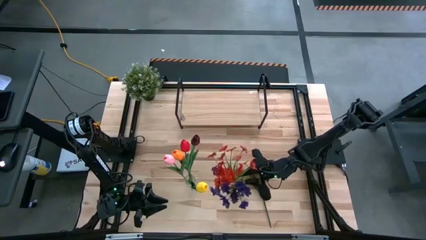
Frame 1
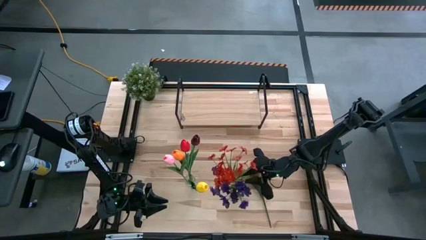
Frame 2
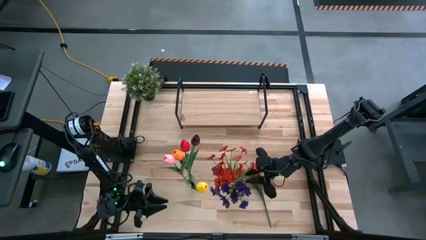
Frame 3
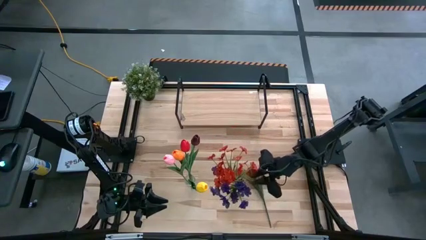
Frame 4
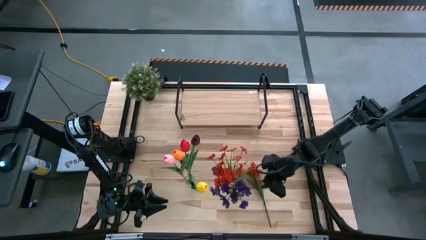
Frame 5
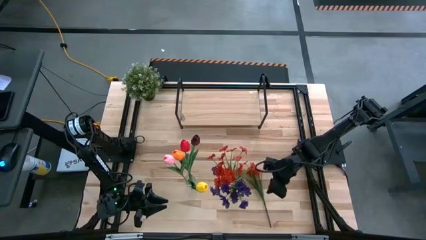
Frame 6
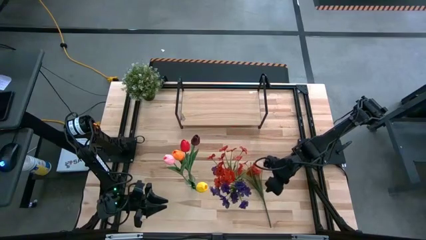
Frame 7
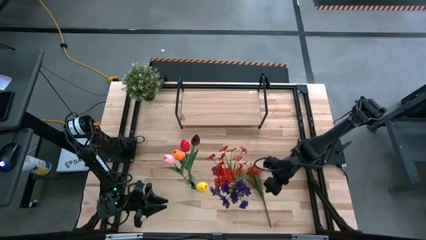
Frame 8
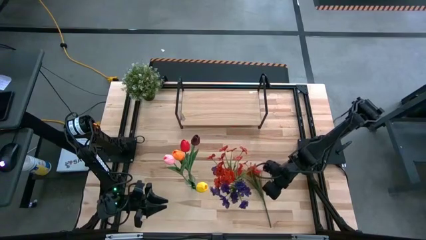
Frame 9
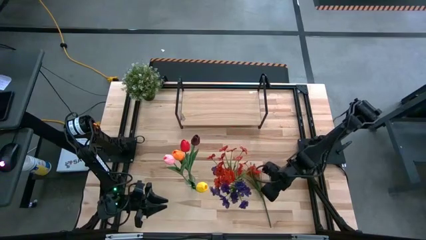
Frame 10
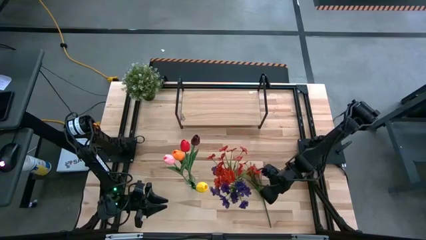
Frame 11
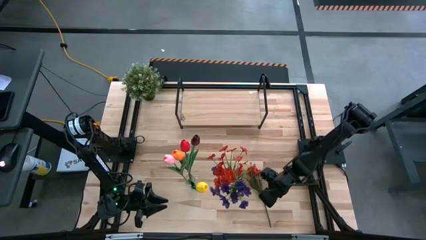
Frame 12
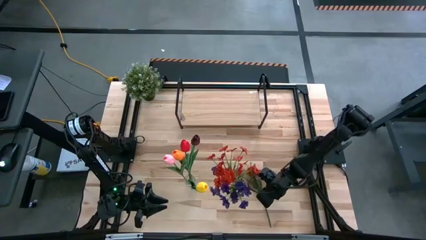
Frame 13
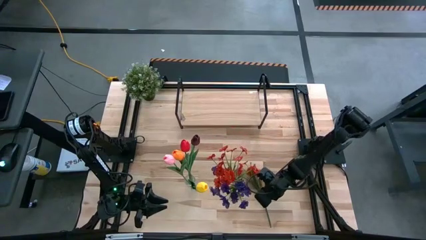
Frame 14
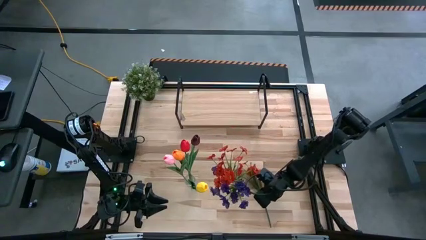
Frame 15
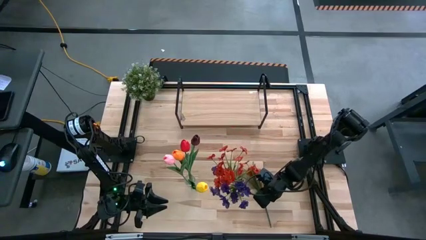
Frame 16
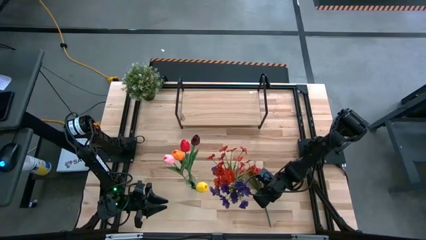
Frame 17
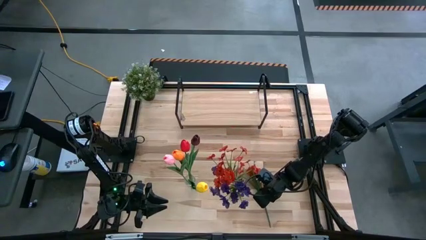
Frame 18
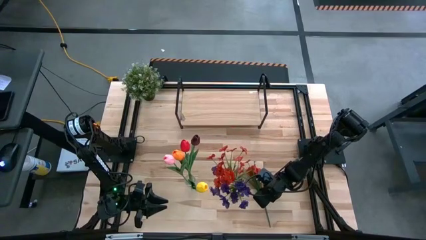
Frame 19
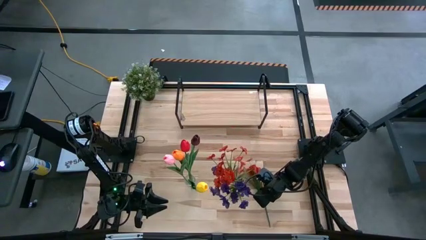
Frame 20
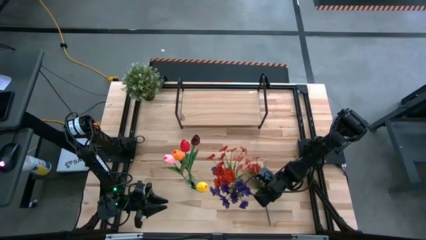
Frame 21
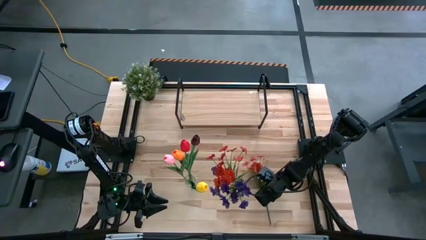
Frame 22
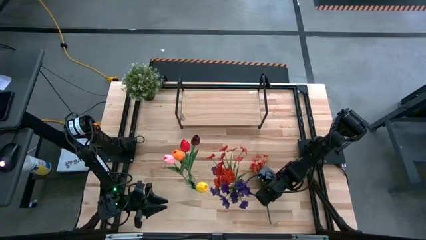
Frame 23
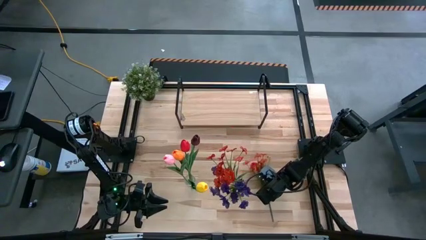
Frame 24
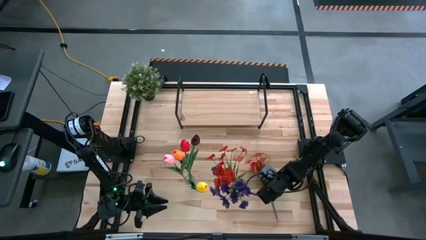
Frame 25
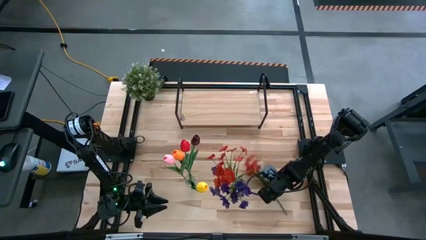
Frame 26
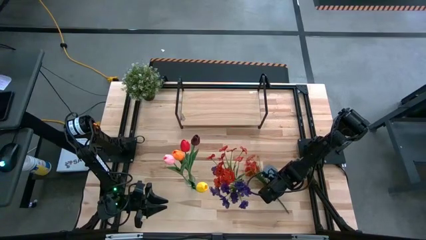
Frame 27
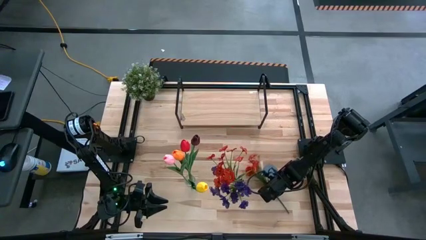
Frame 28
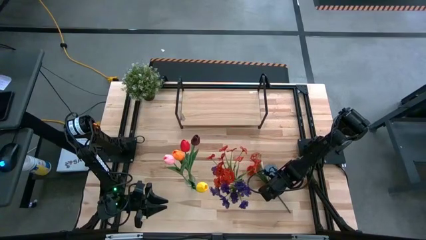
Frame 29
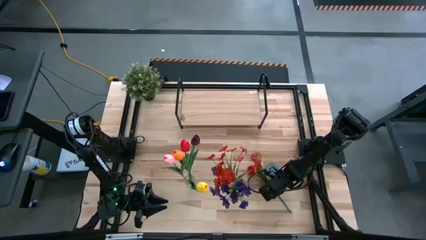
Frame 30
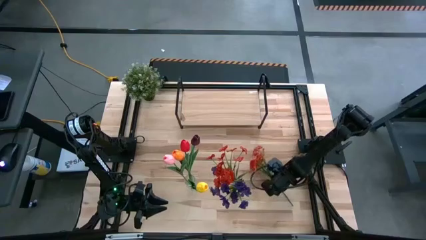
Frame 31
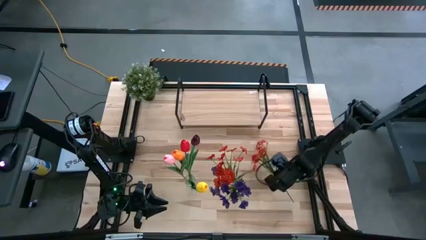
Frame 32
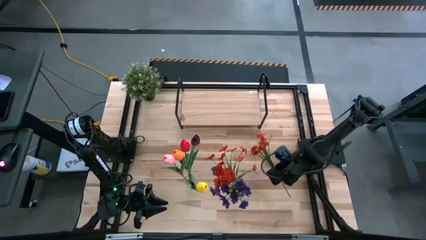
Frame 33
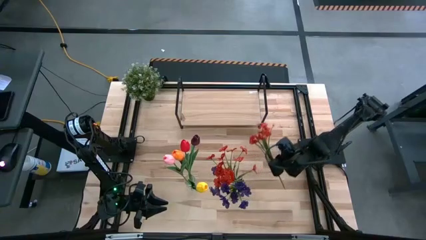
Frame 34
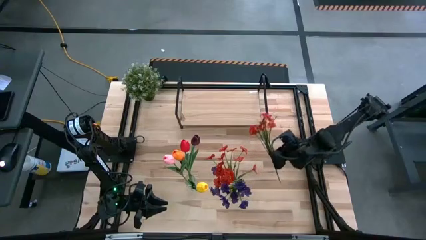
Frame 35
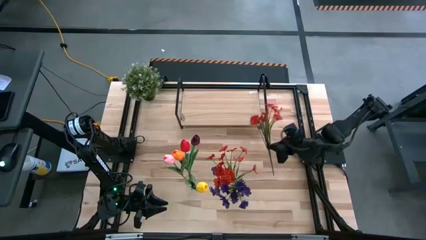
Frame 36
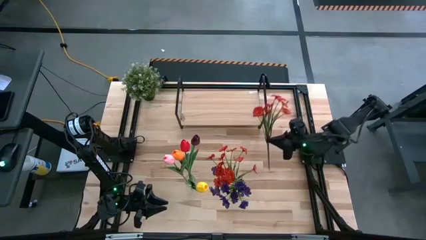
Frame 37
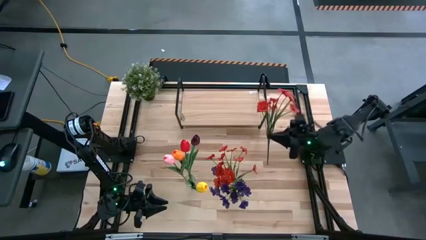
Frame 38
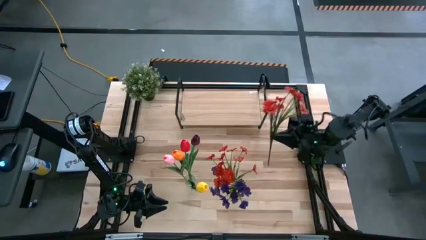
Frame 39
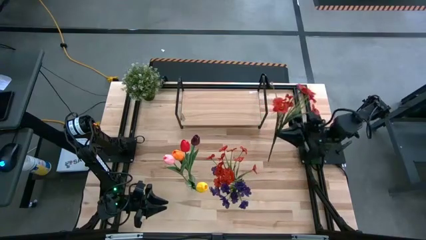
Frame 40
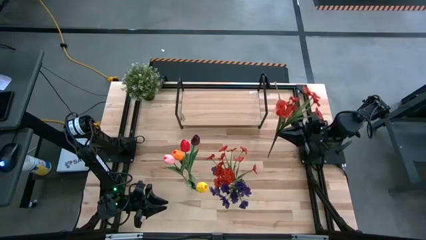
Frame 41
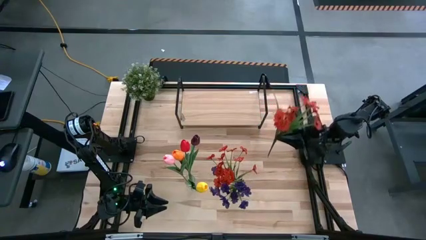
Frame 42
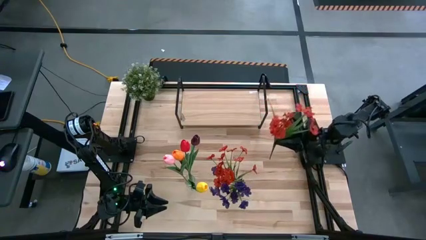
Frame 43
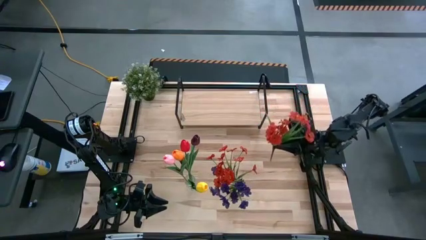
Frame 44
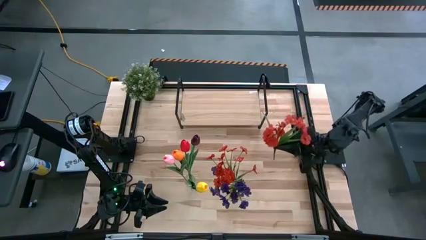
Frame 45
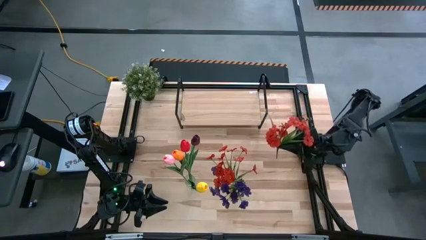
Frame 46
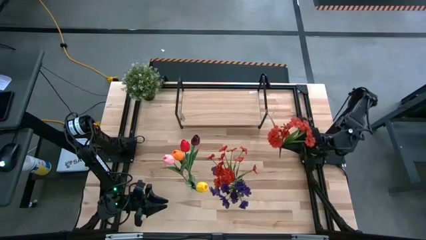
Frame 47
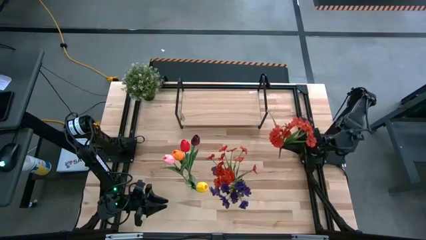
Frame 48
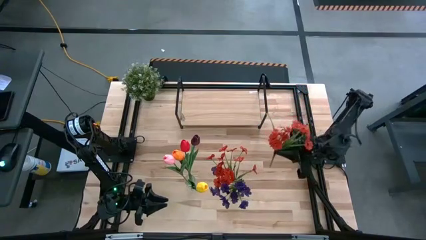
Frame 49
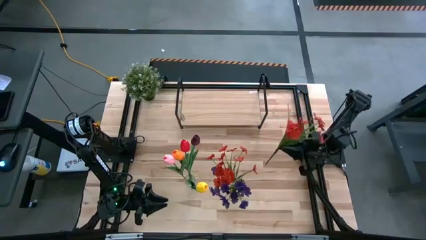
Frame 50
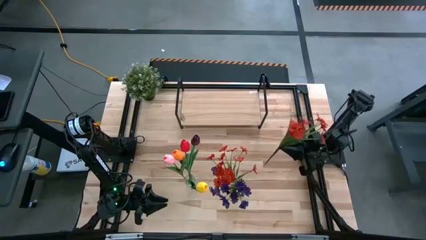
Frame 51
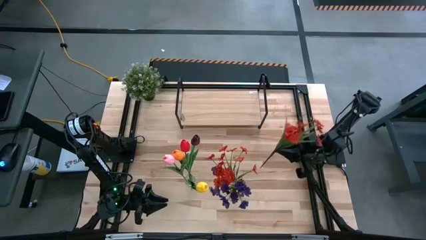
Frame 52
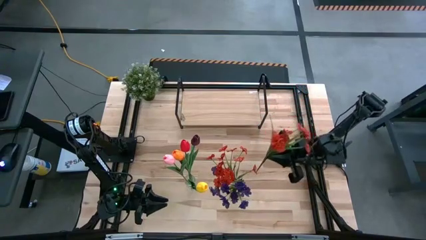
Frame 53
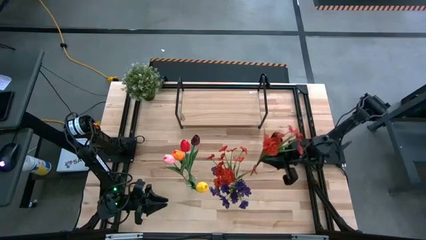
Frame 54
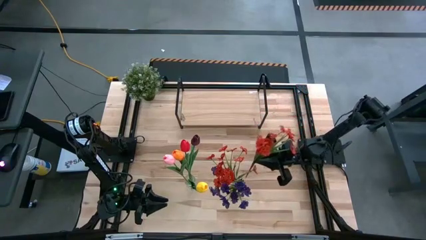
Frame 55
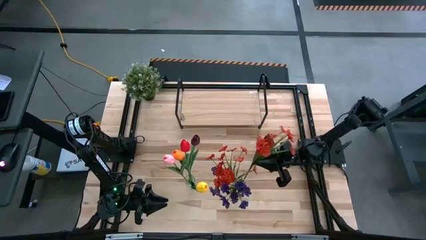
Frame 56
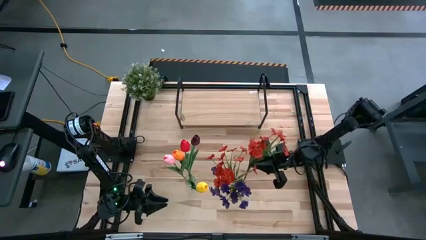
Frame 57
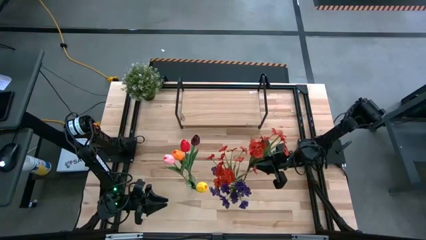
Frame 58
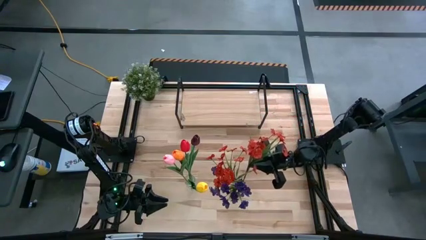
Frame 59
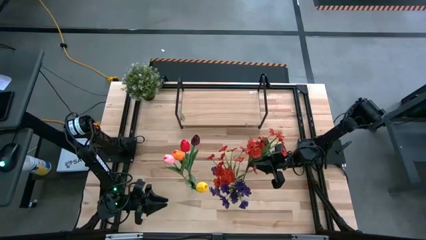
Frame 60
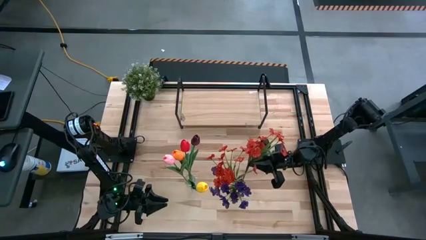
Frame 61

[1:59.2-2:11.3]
Task: Pick and place flowers into a vace then onto a shelf
Put the red flower into the right transparent vase
